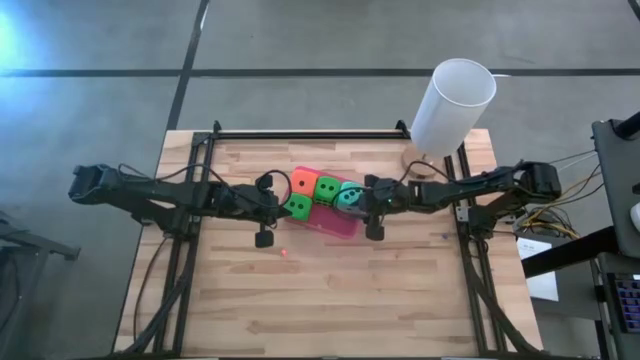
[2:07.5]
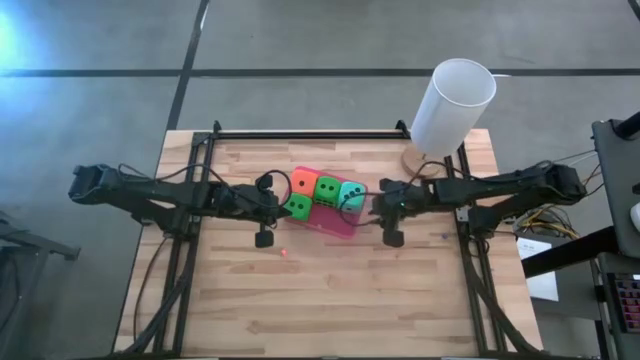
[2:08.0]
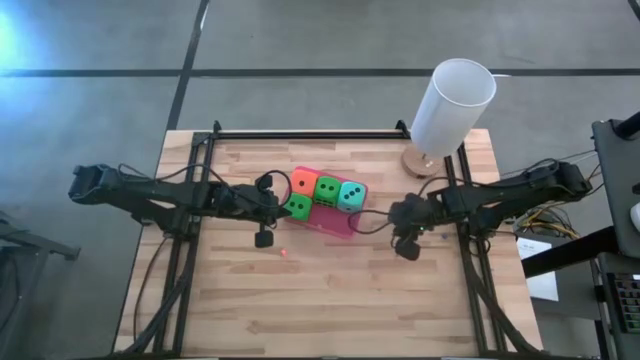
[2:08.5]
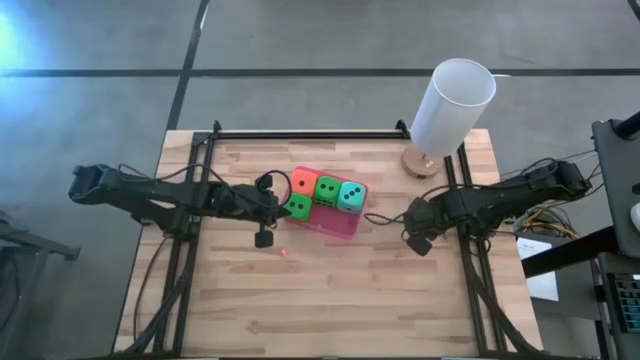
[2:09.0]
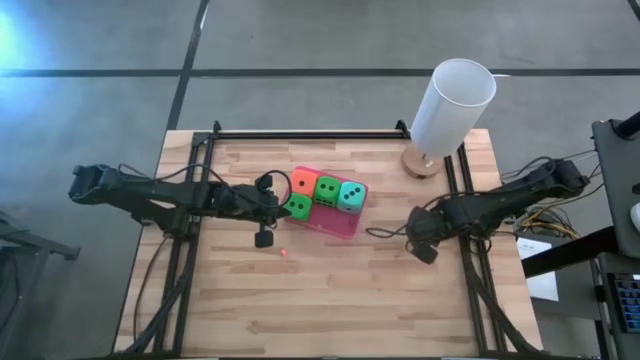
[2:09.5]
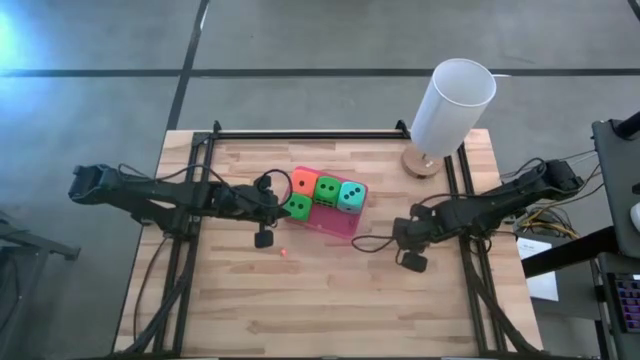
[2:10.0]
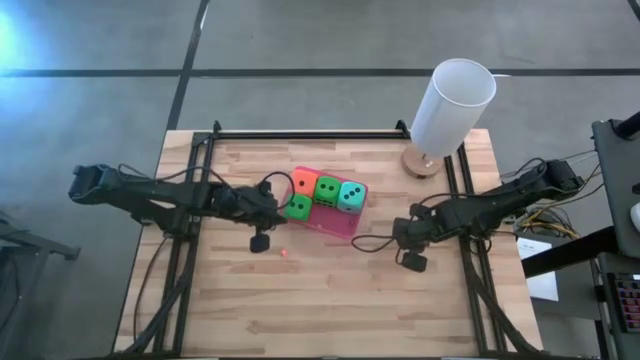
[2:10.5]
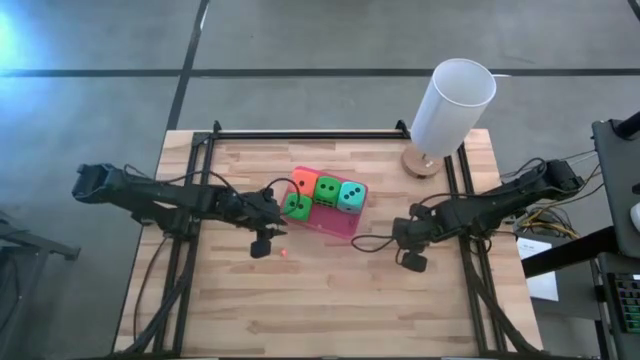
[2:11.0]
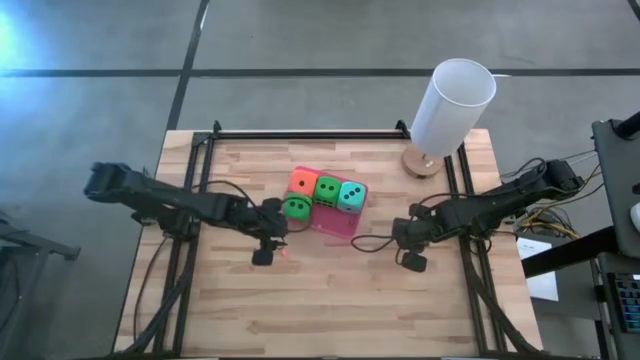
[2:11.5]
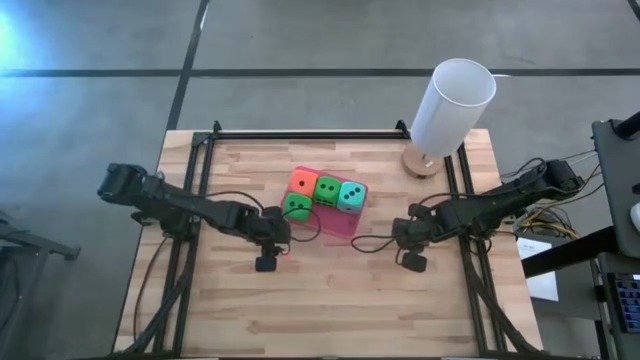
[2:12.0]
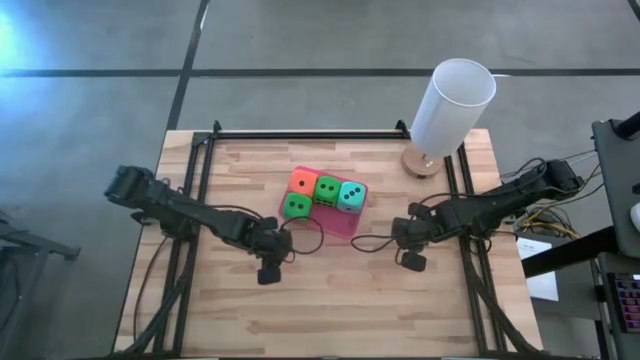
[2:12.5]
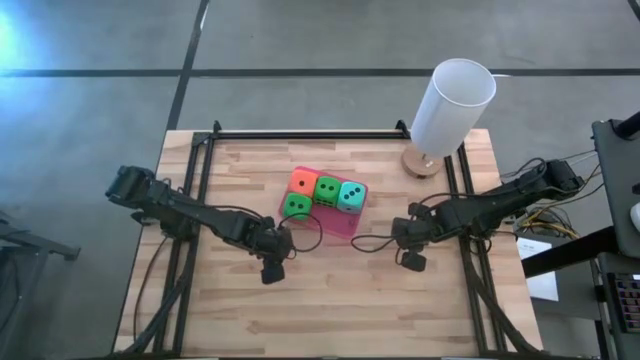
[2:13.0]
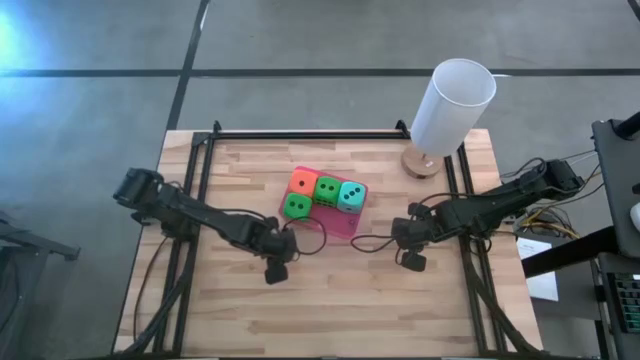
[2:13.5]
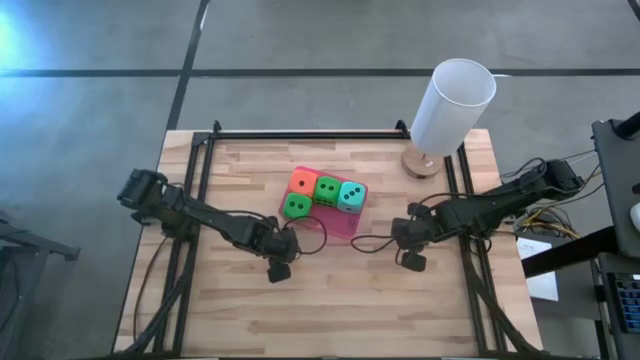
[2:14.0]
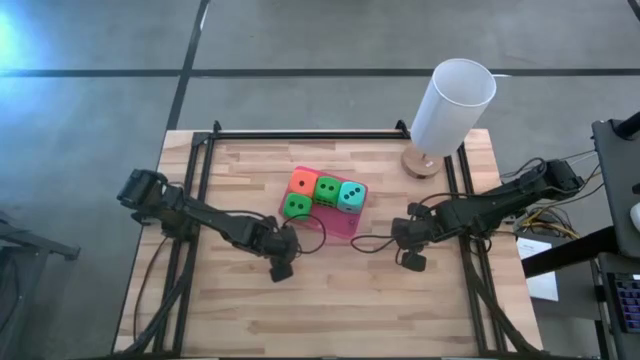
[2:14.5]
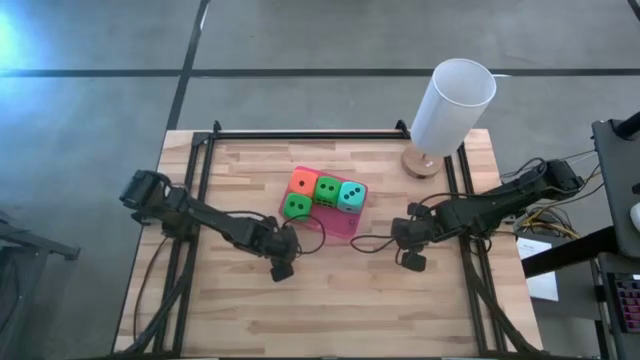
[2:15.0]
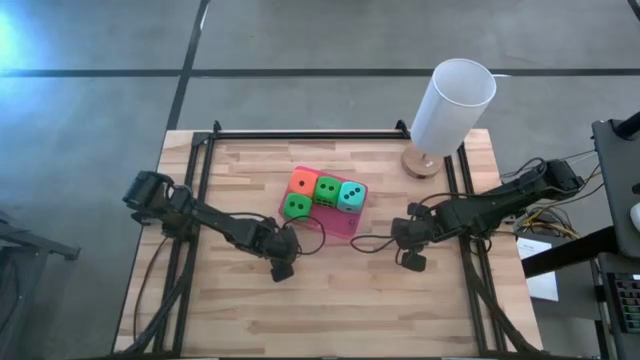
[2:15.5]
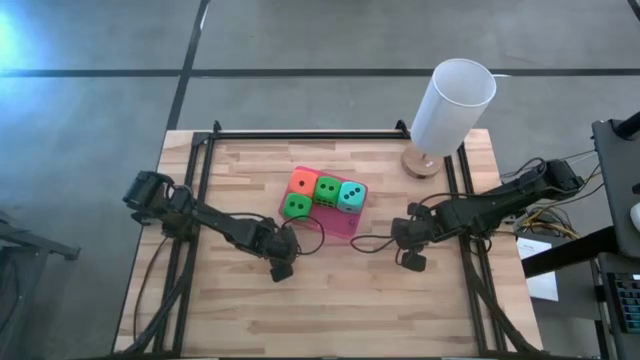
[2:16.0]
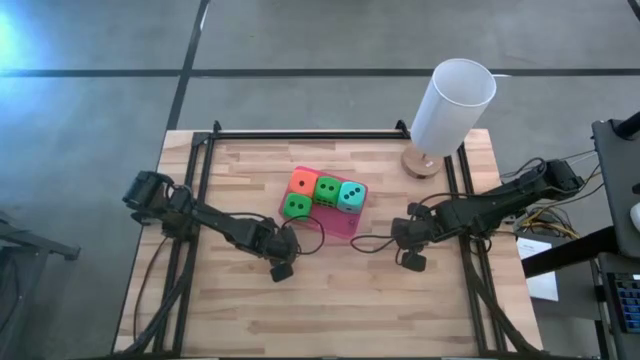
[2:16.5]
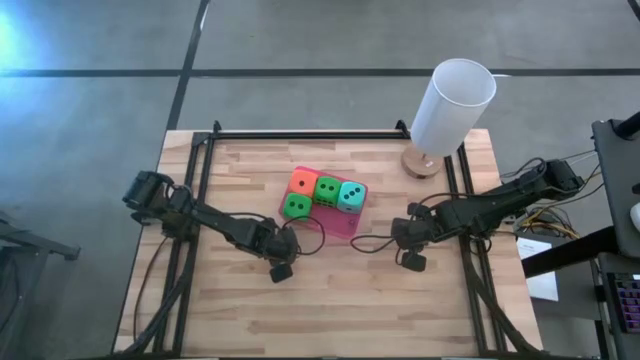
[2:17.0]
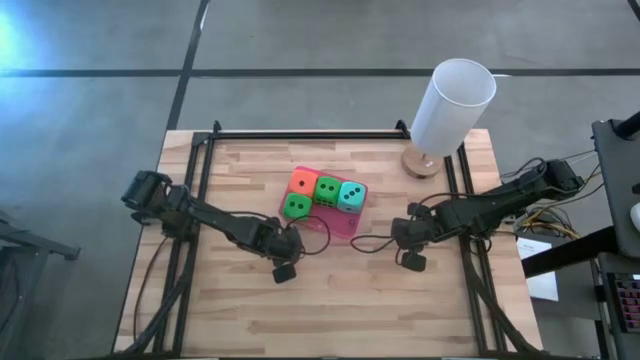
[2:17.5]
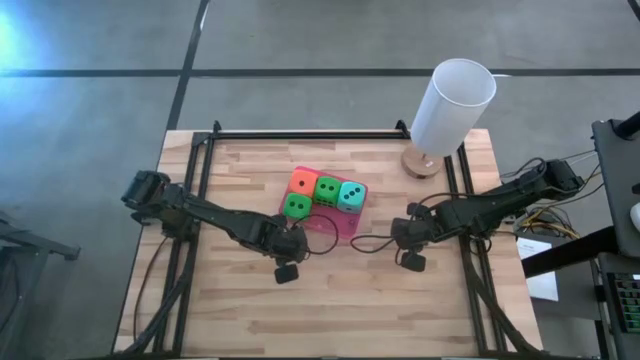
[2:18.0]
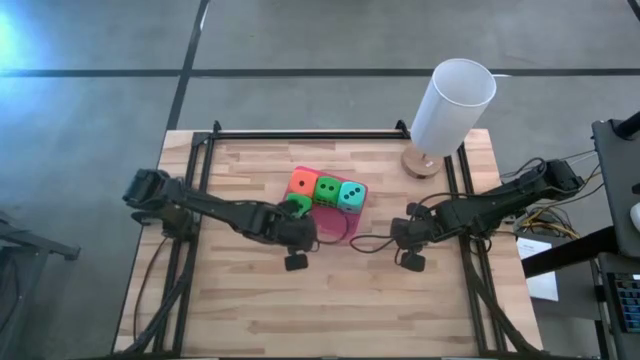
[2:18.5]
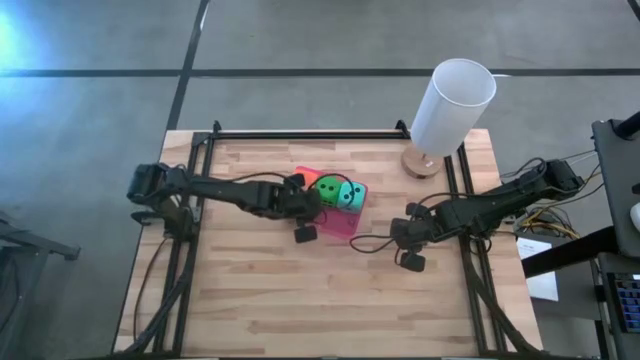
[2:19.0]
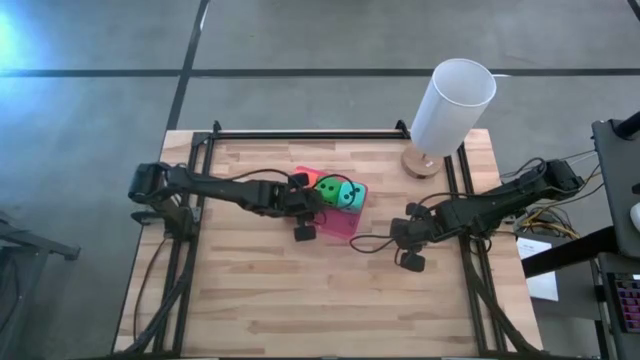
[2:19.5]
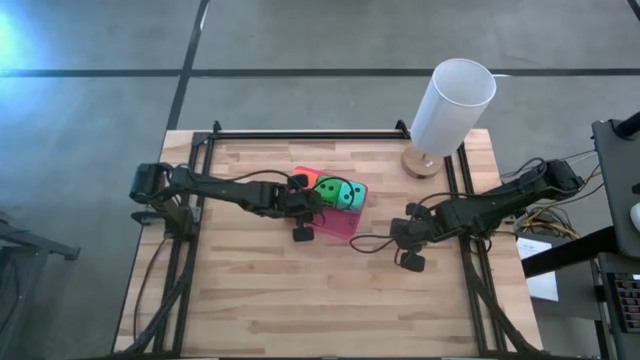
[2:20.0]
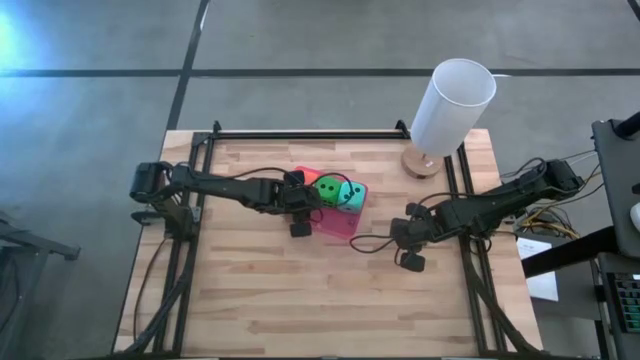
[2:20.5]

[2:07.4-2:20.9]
Task: Pick & Place Dice
Put the small orange die into the pink bin

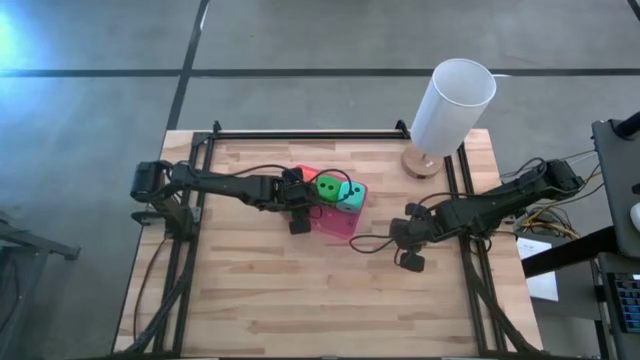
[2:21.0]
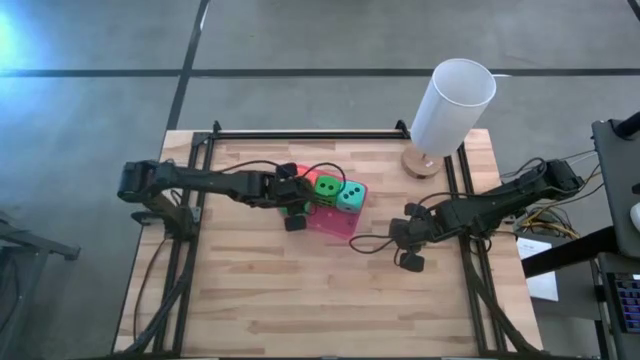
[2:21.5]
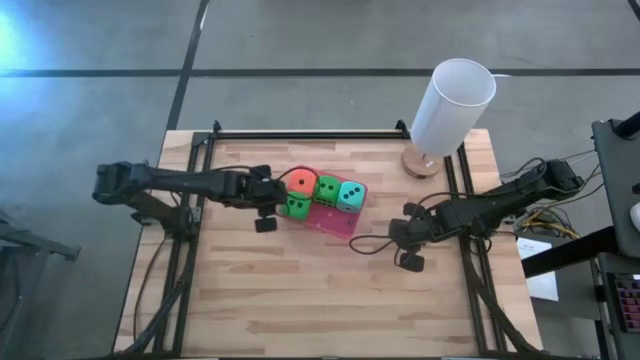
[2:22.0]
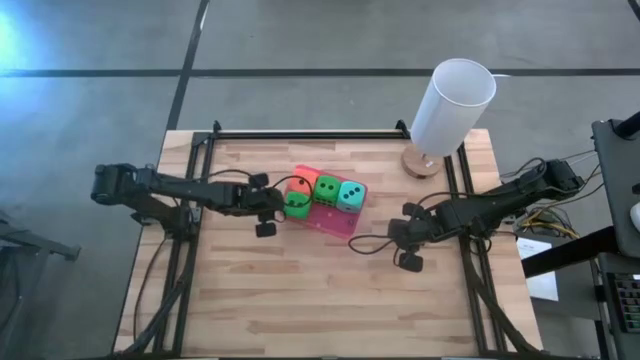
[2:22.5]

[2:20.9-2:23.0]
Adjust the pink bin

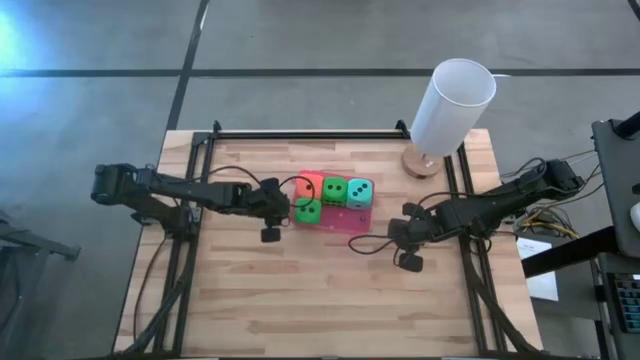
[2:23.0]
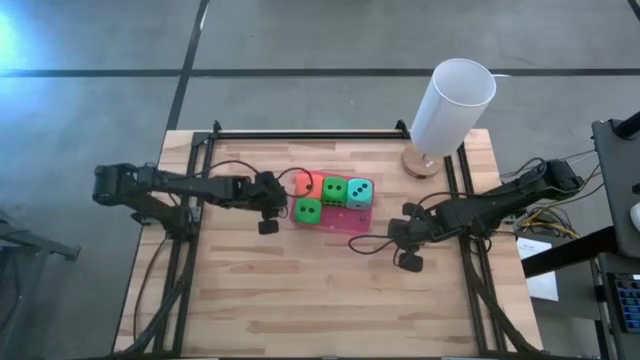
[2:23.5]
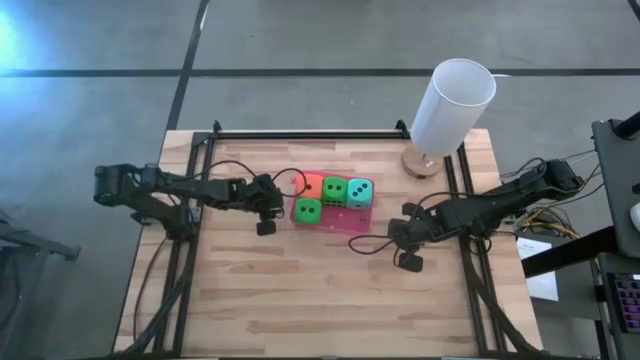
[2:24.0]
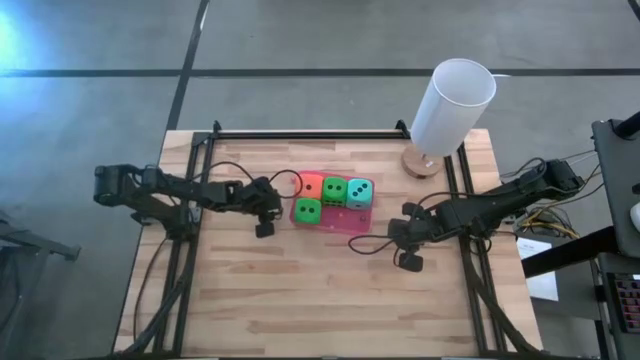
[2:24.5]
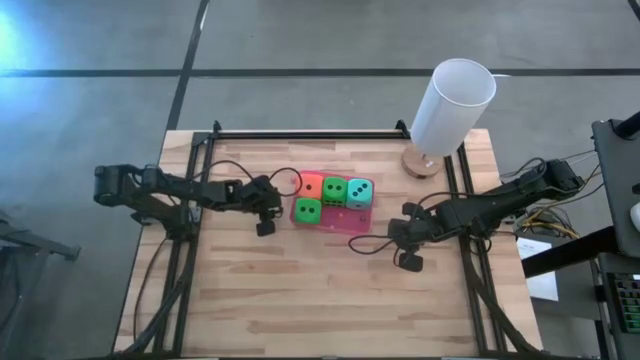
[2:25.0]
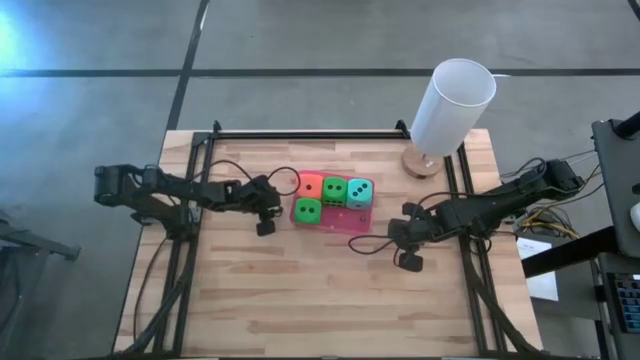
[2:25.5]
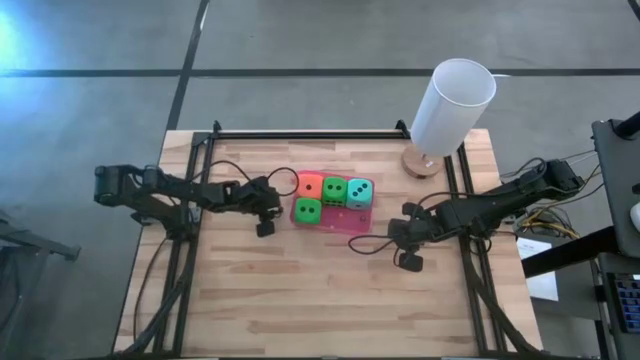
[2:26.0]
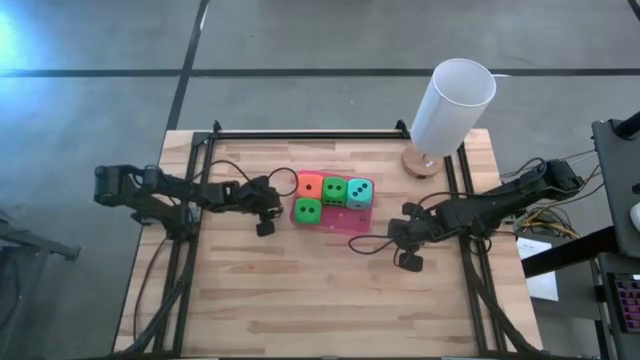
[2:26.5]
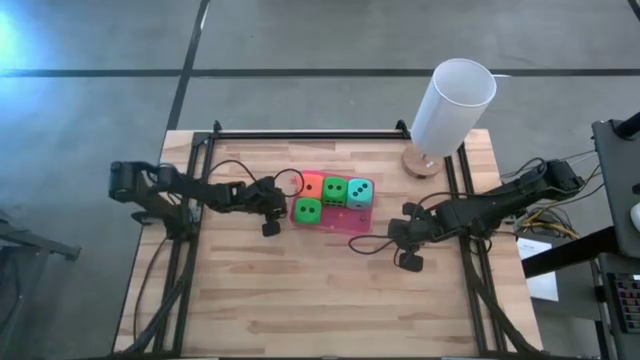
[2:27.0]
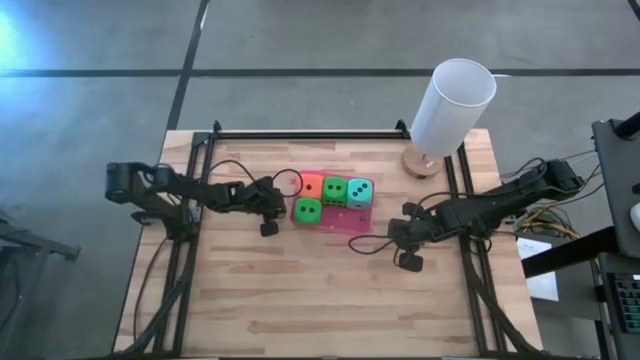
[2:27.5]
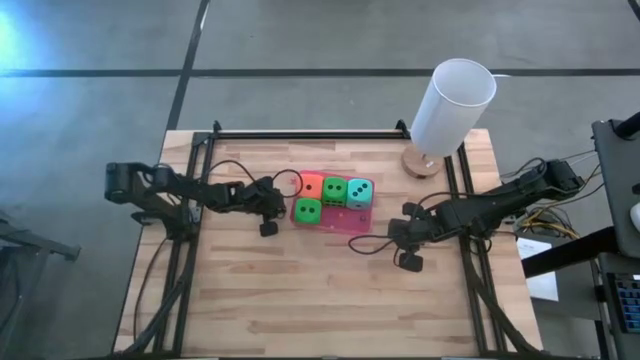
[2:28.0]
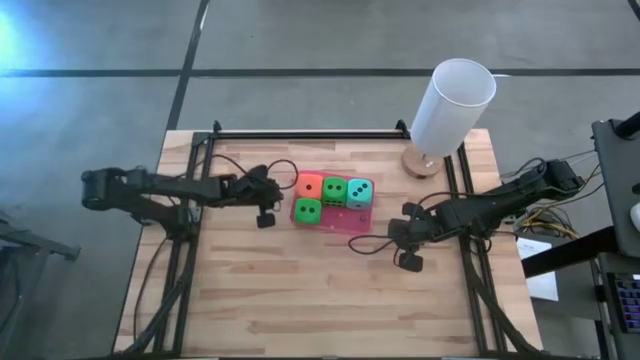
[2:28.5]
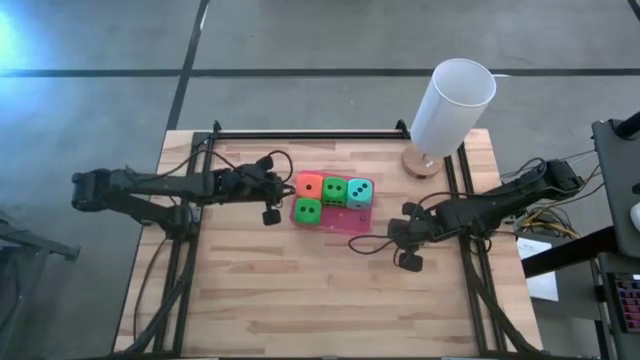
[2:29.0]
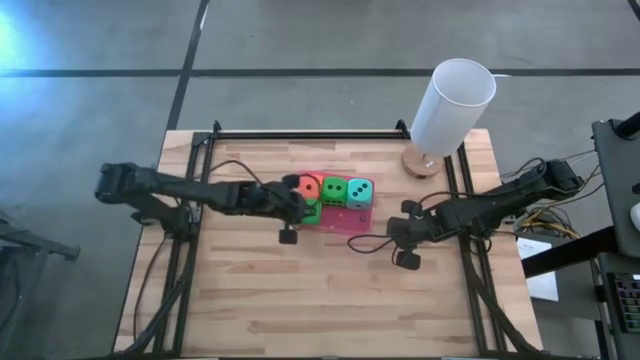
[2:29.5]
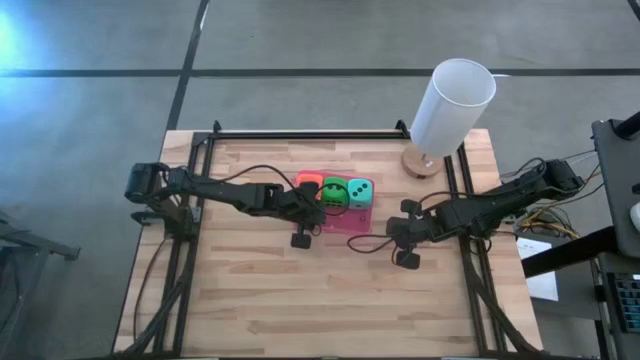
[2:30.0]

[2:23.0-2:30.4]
Put the small black die into the pink bin
